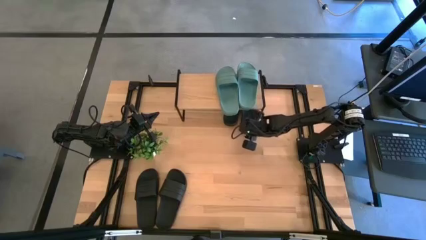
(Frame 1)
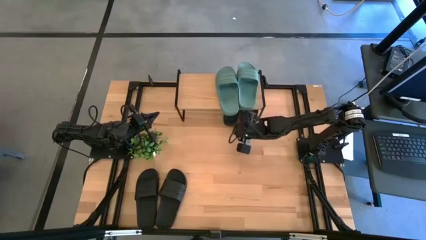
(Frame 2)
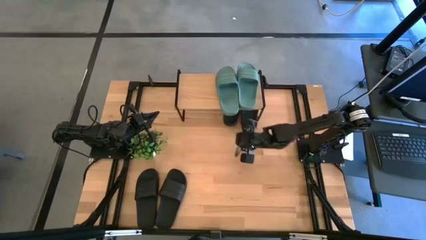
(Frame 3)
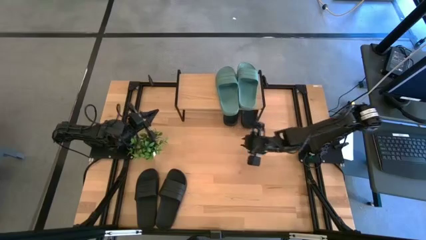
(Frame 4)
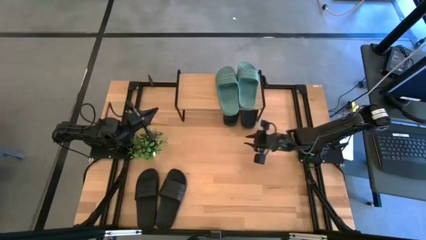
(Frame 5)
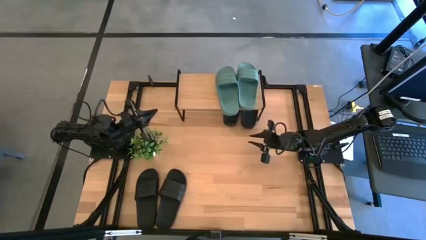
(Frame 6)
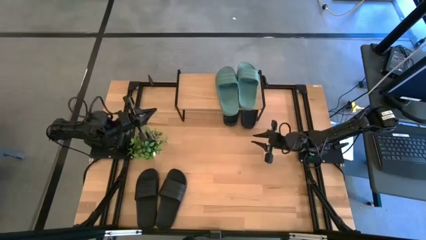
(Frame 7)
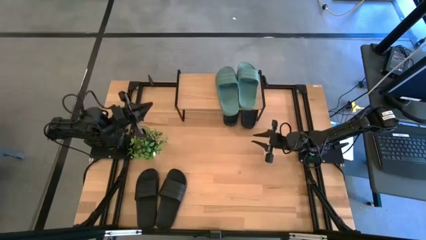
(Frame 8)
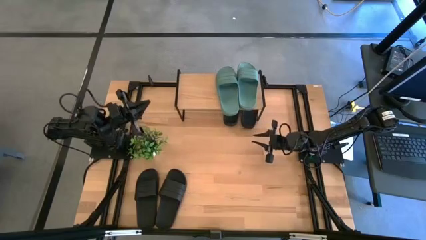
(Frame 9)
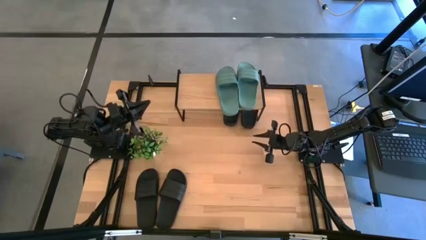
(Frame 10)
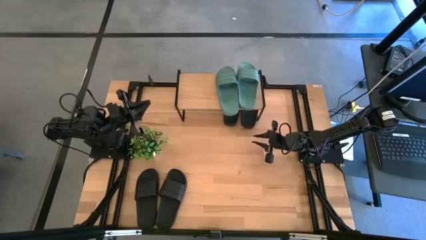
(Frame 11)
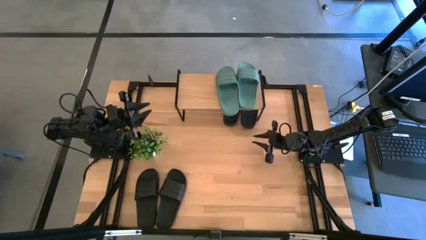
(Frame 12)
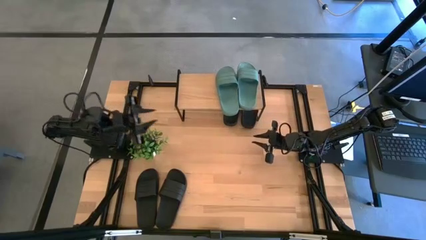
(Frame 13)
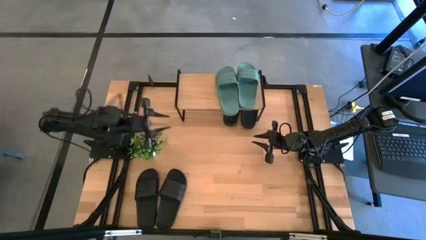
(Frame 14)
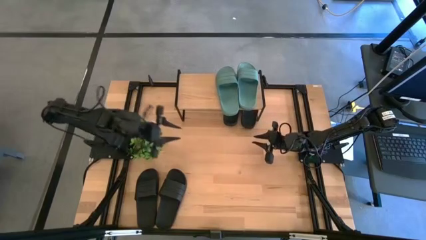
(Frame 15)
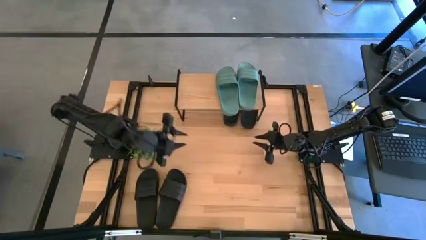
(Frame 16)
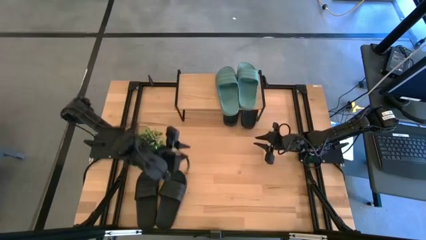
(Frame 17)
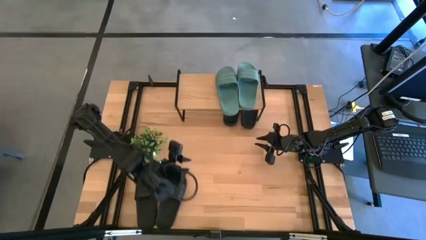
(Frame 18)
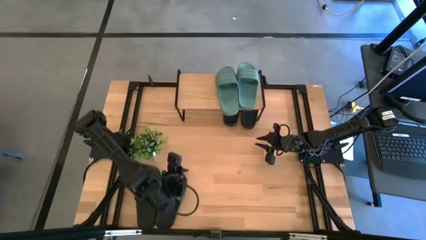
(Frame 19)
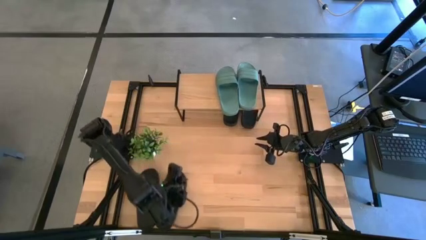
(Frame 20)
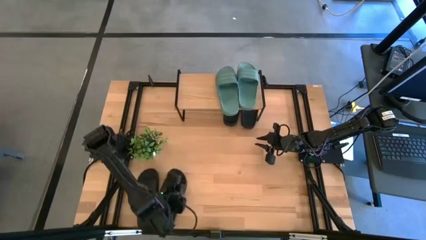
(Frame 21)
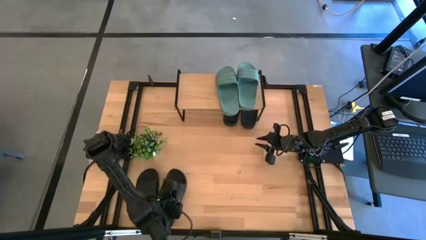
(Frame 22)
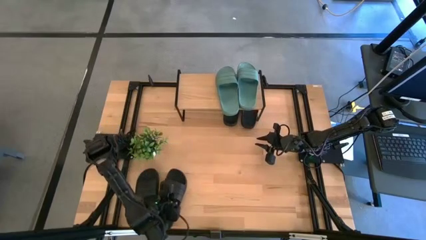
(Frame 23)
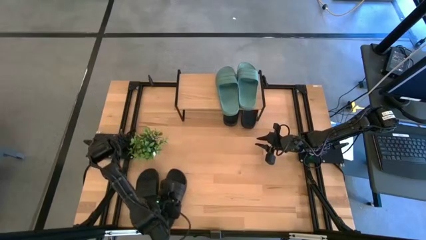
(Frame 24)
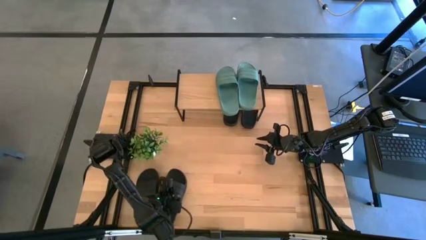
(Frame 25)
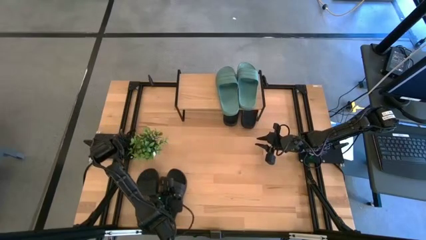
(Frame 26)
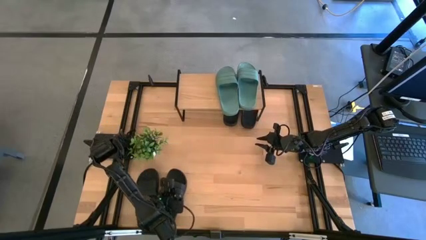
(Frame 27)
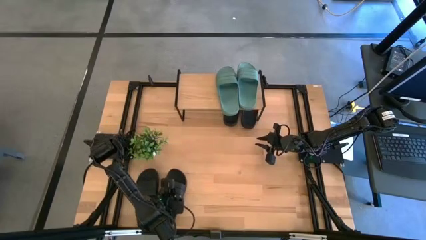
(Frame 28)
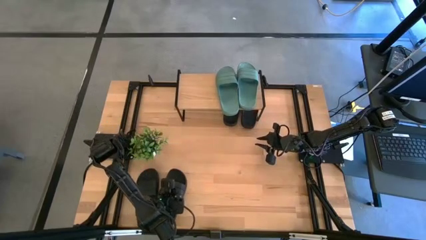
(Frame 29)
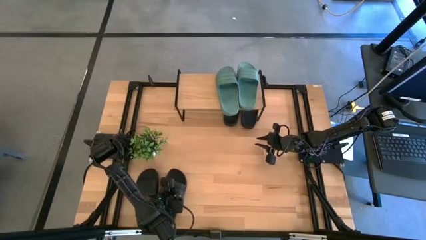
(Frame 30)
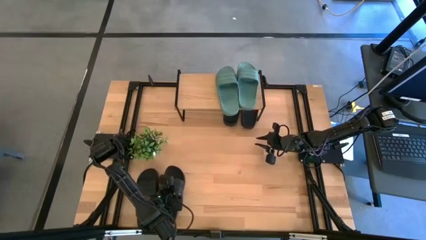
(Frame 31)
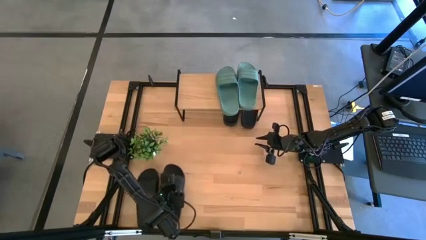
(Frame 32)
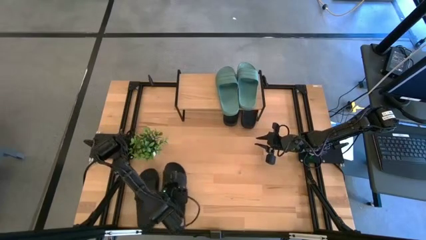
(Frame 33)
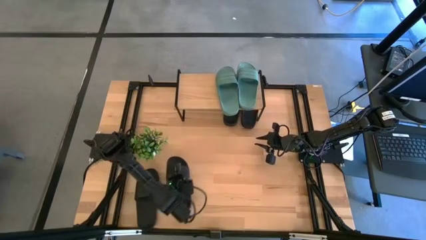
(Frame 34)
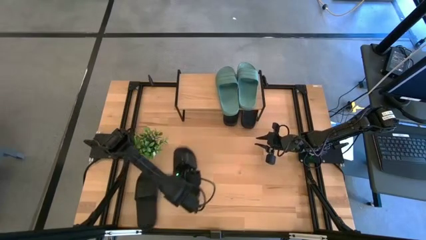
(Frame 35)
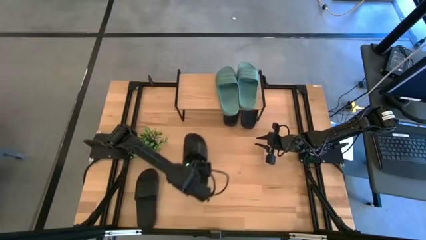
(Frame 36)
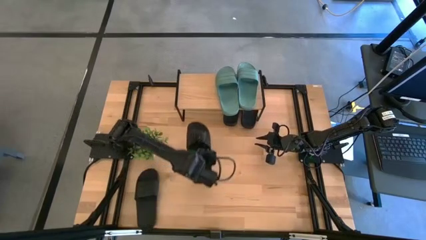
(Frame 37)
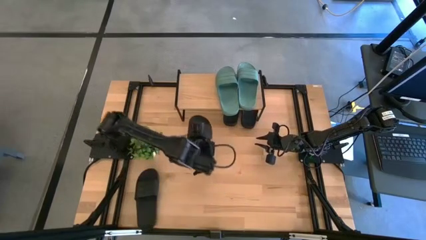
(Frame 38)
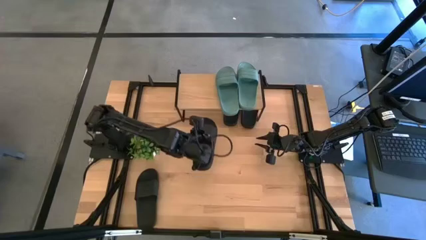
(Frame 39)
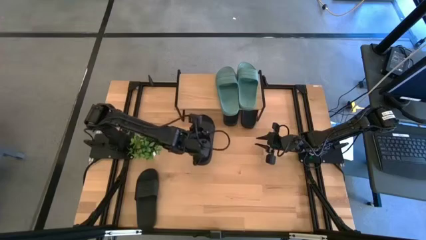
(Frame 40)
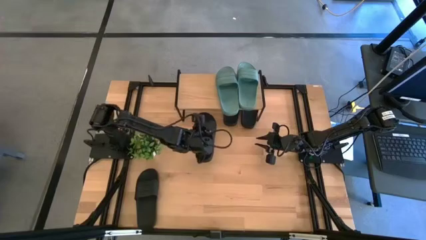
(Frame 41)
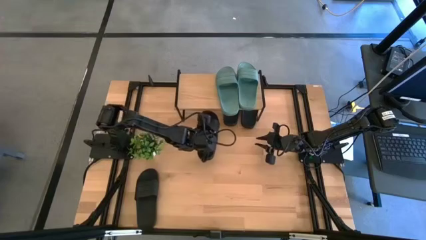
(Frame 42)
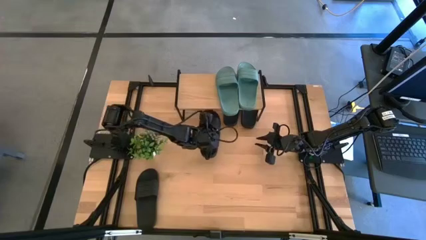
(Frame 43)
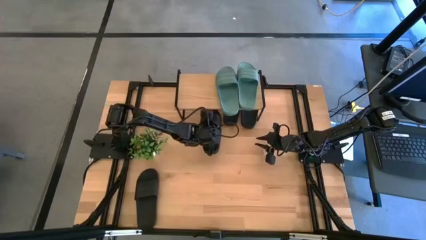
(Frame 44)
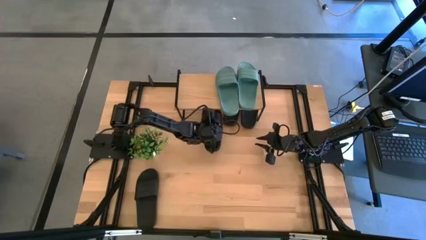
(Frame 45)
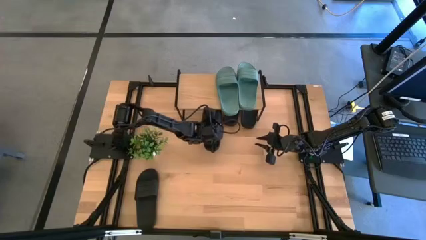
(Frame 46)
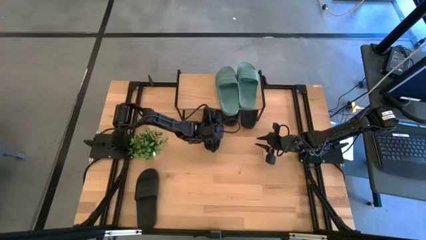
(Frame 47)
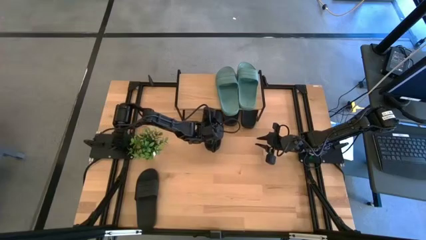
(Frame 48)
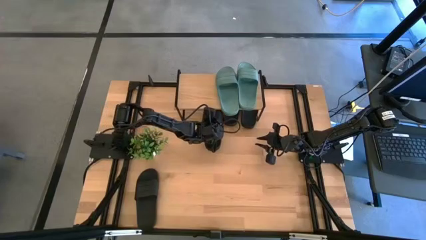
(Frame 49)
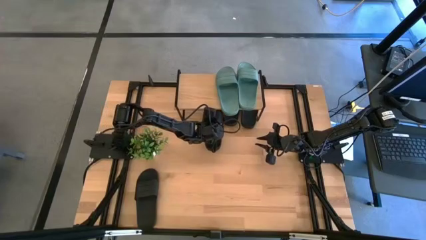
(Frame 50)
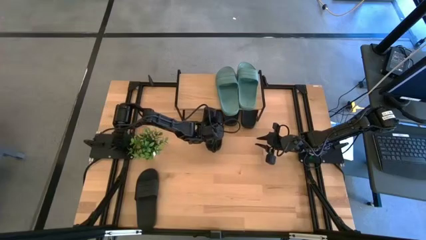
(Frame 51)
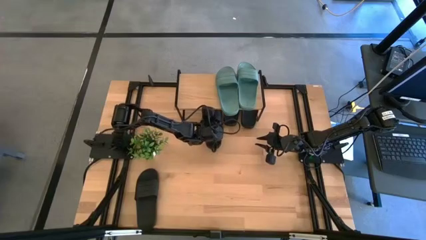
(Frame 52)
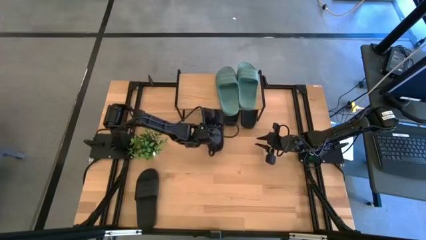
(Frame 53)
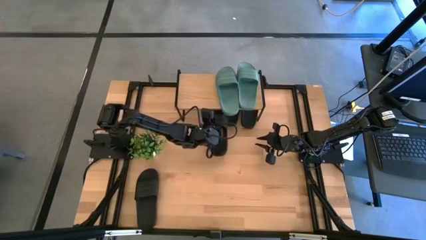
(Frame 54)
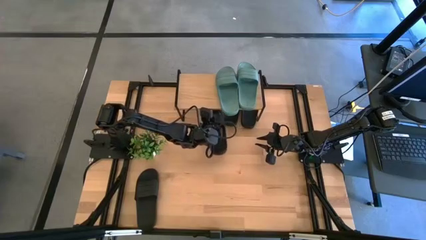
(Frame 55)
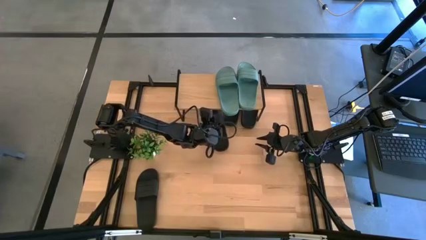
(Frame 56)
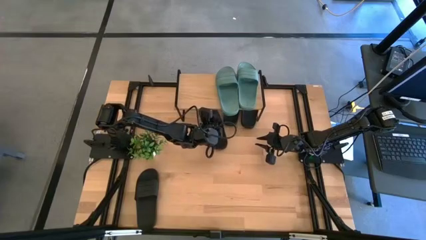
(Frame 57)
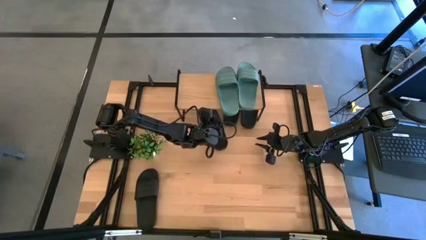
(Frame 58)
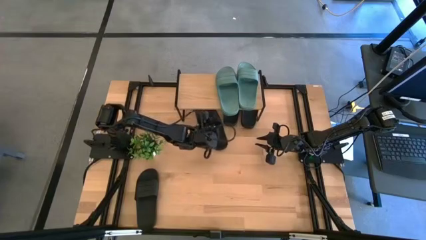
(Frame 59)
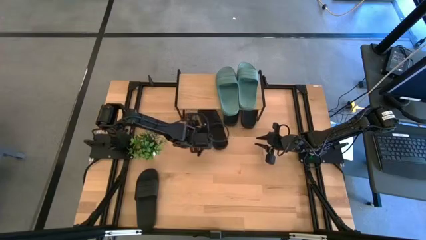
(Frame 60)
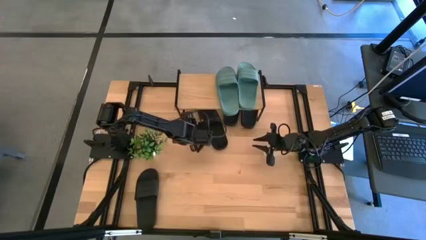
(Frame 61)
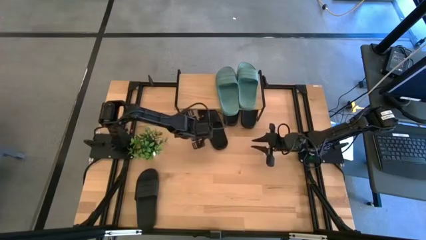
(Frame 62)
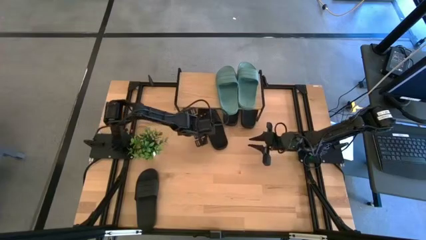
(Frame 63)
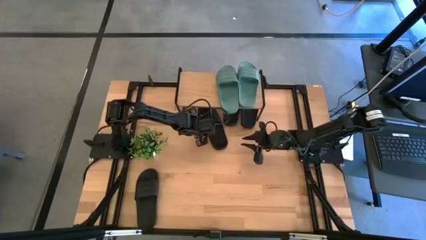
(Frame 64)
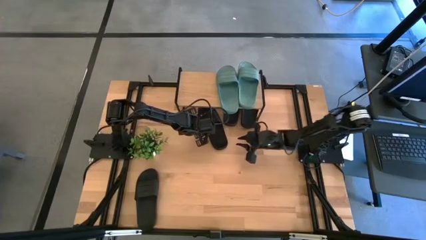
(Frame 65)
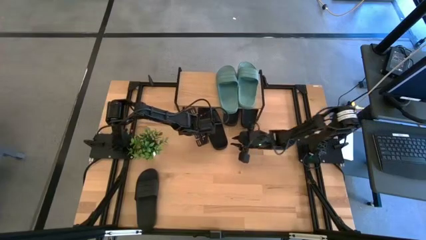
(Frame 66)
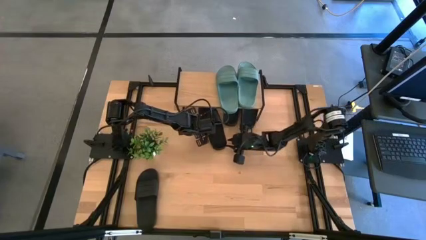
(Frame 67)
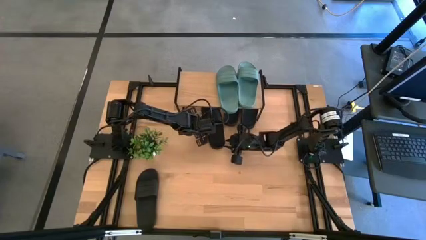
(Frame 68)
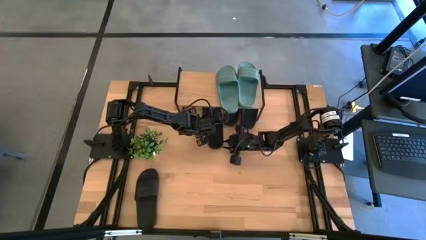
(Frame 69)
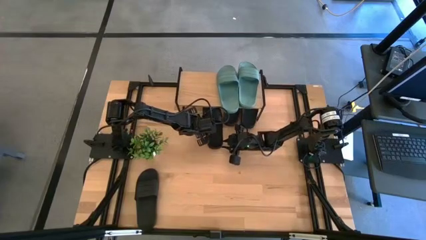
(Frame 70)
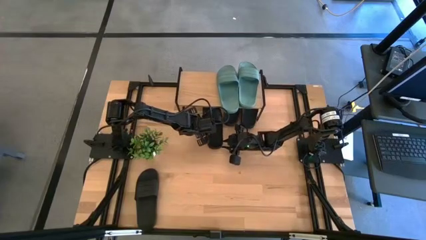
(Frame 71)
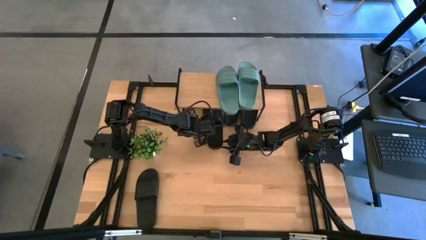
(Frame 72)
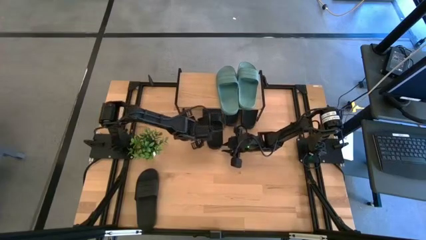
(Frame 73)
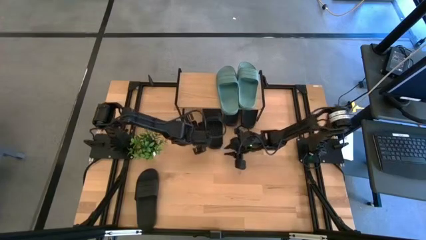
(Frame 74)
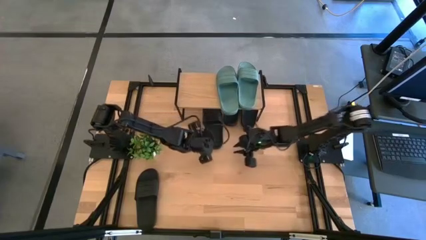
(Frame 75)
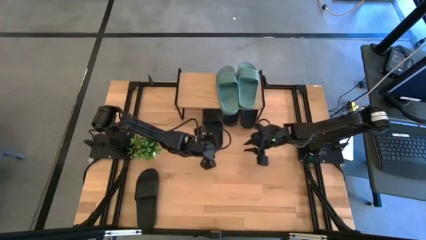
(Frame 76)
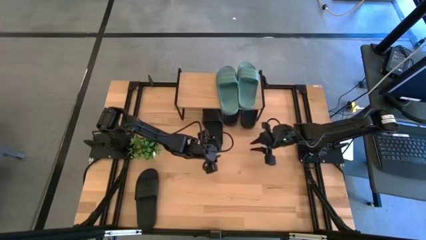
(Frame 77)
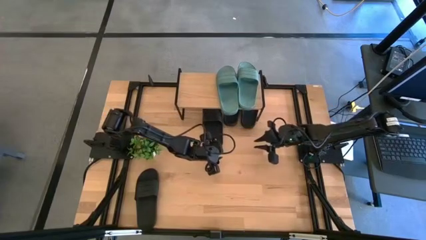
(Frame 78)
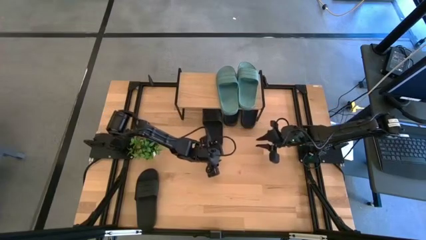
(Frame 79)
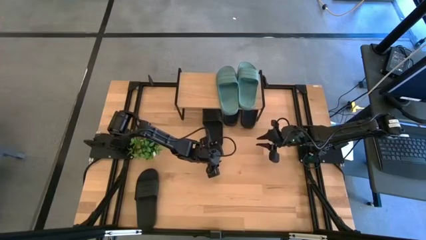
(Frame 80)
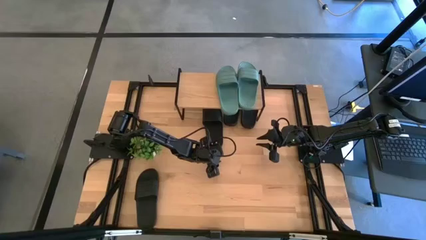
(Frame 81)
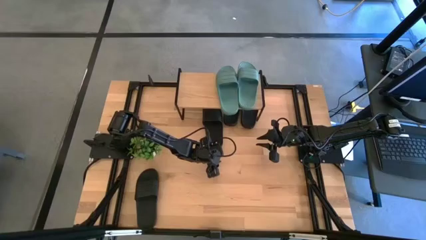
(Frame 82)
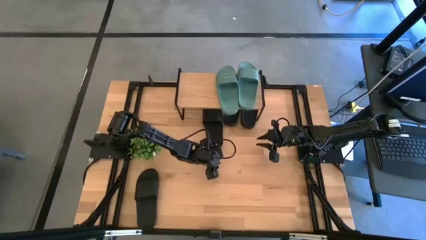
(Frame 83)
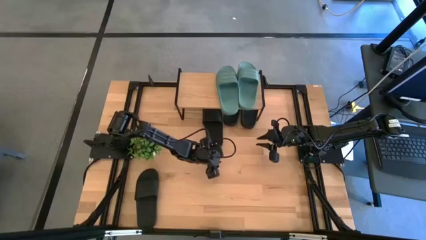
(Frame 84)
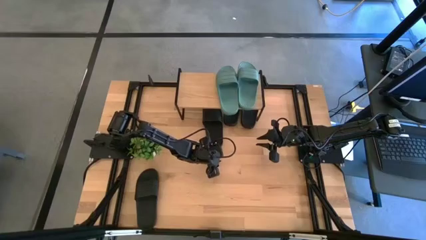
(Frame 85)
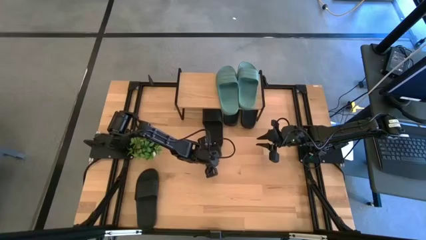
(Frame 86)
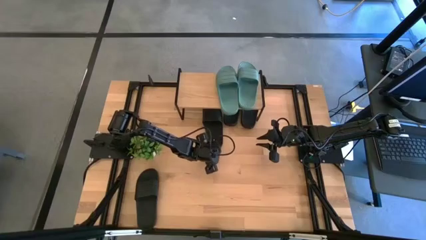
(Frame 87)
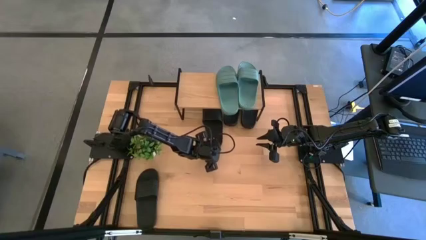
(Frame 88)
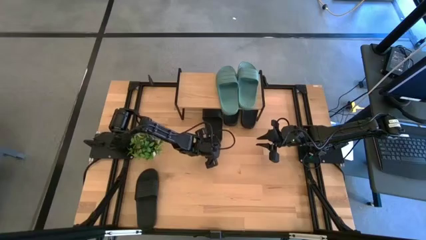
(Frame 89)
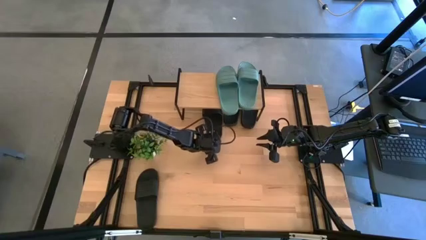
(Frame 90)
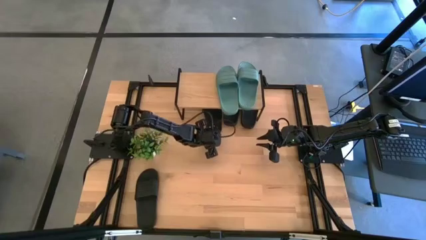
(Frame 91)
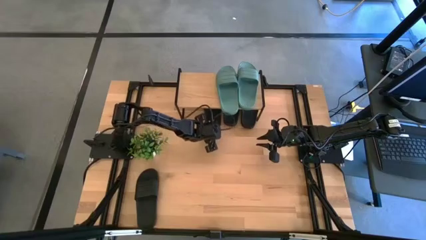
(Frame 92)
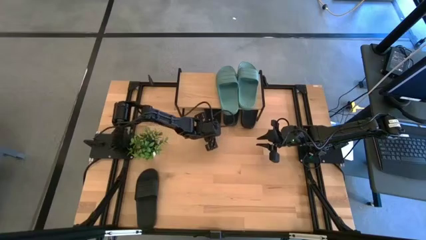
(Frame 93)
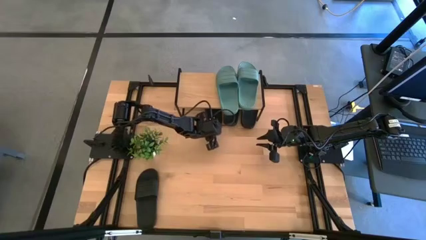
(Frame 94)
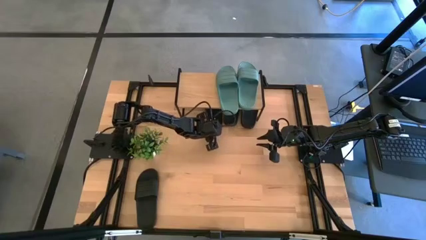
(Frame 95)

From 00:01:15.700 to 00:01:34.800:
Task: Pick and place slides into the shelf
Put the black slide under the shelf
